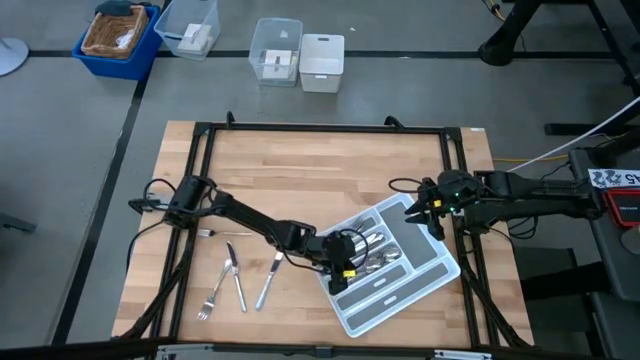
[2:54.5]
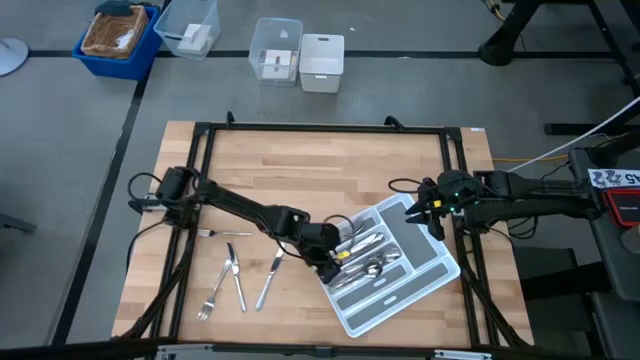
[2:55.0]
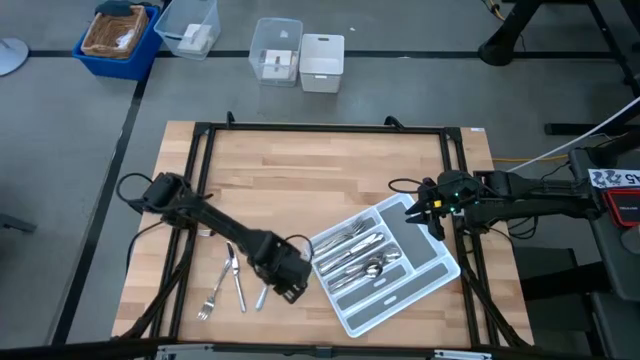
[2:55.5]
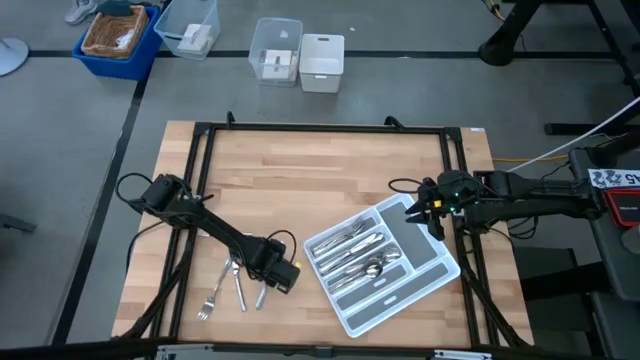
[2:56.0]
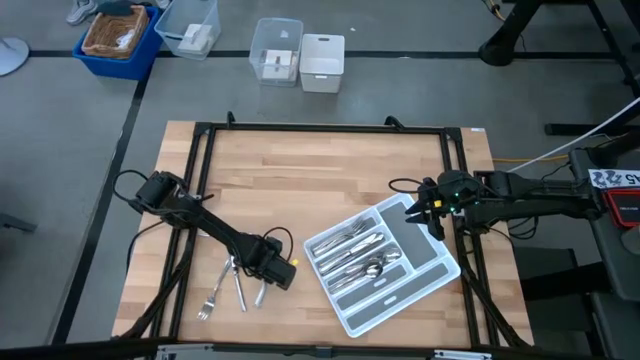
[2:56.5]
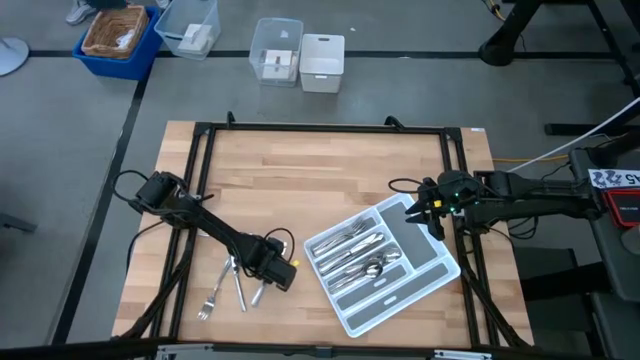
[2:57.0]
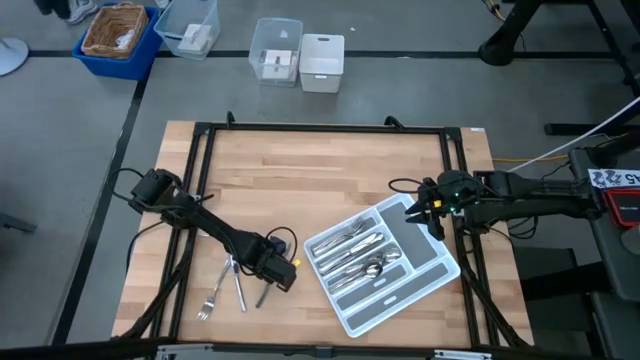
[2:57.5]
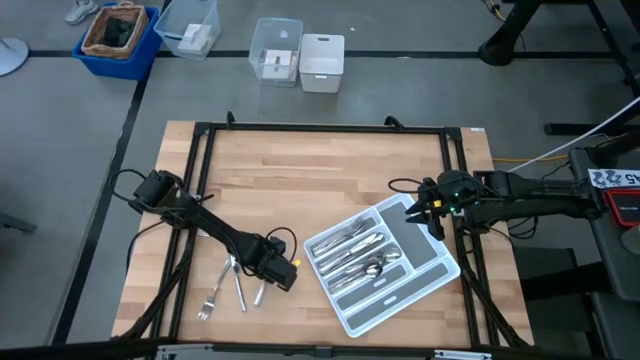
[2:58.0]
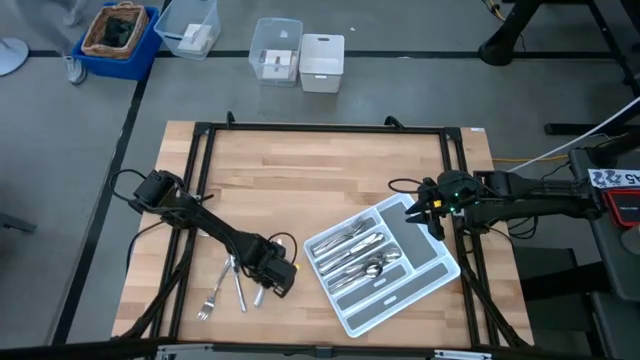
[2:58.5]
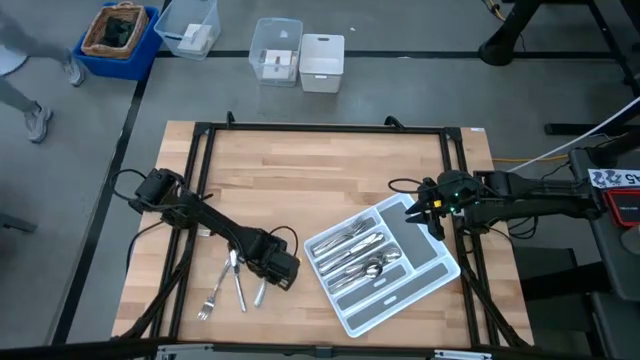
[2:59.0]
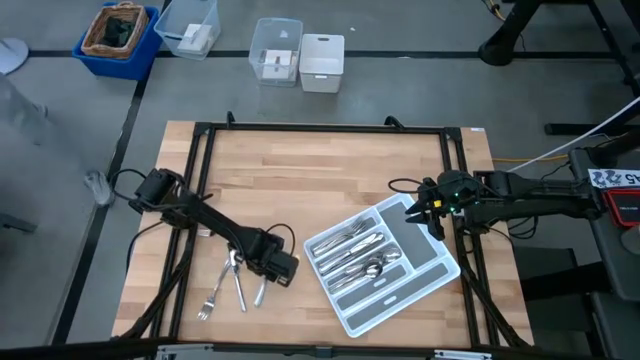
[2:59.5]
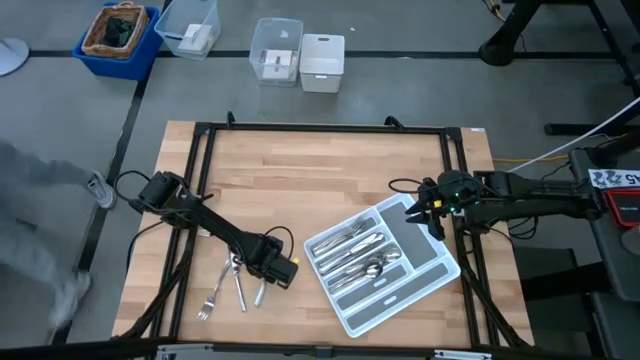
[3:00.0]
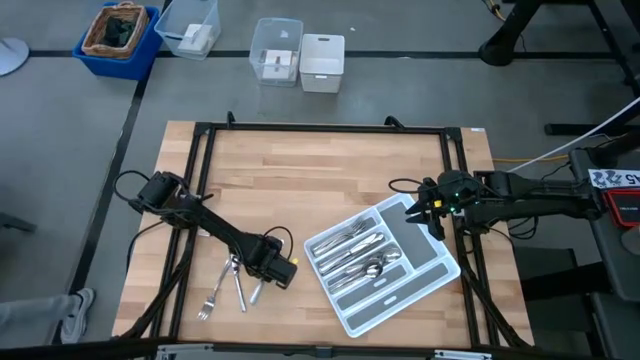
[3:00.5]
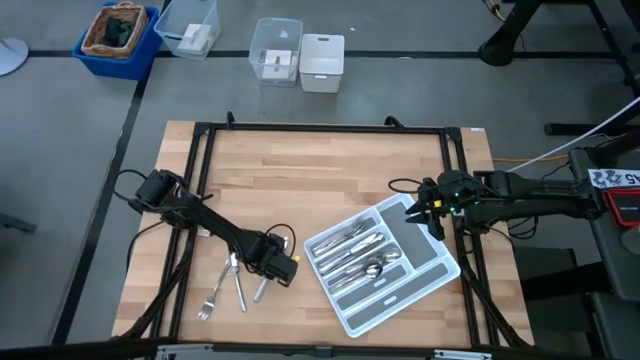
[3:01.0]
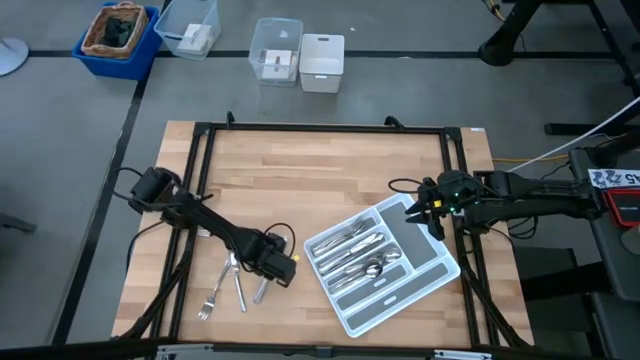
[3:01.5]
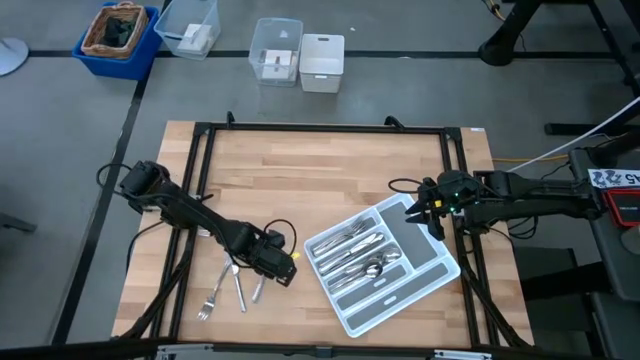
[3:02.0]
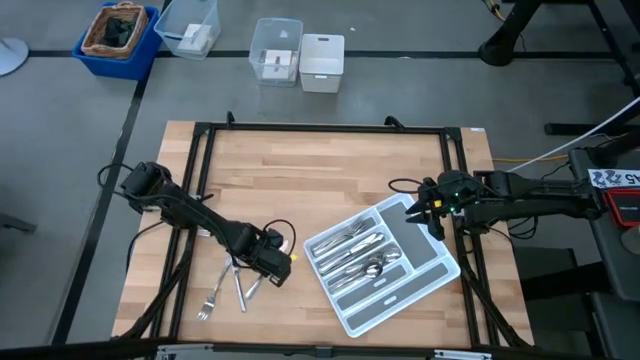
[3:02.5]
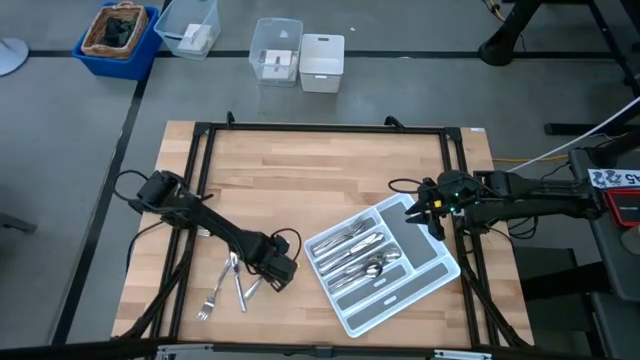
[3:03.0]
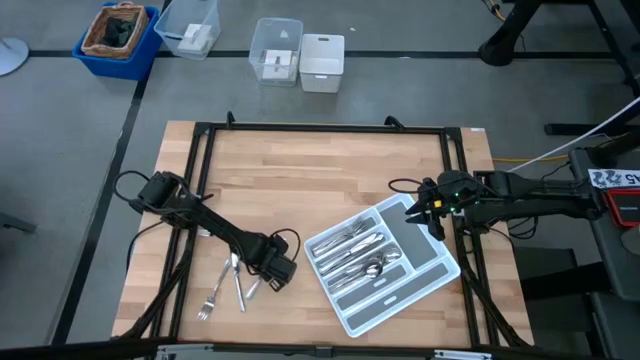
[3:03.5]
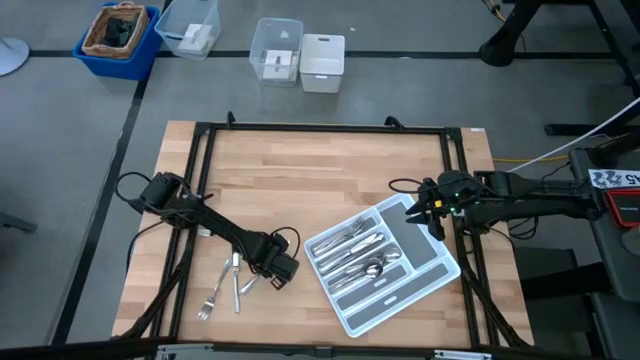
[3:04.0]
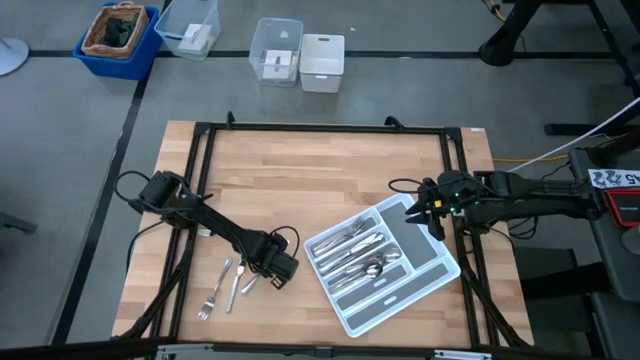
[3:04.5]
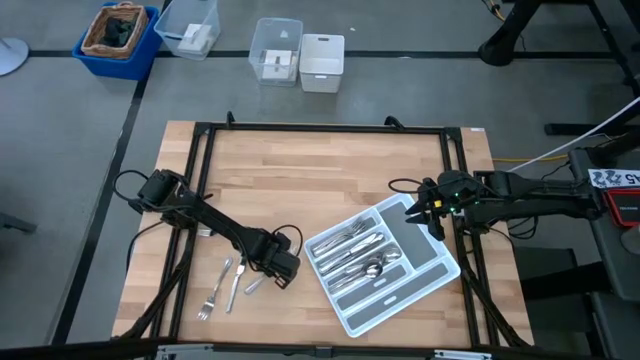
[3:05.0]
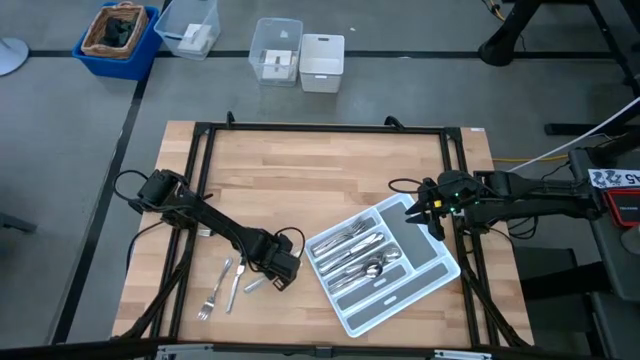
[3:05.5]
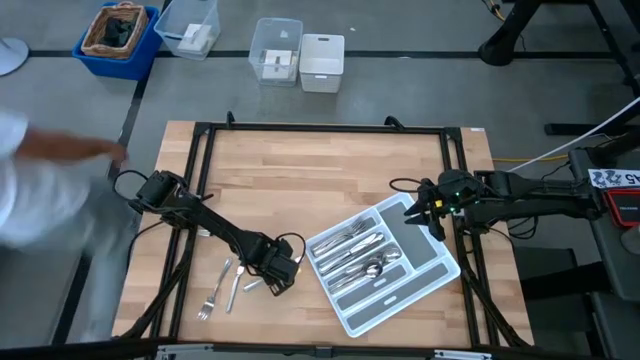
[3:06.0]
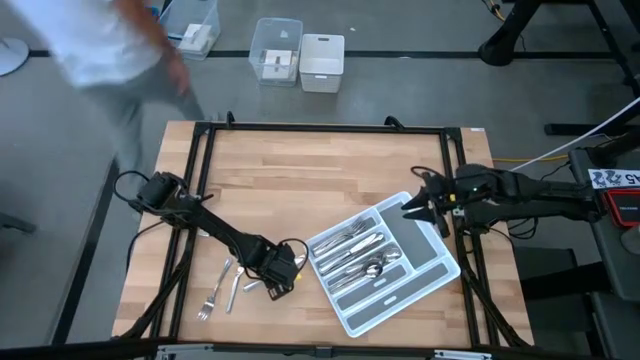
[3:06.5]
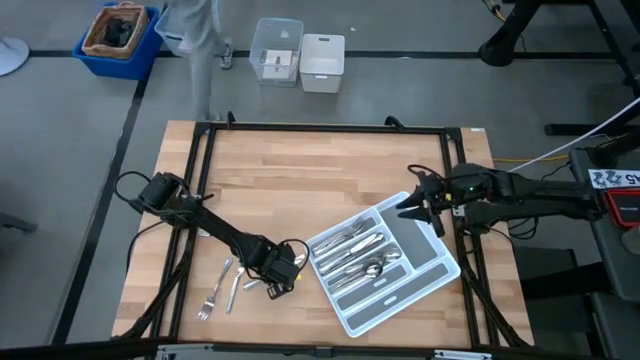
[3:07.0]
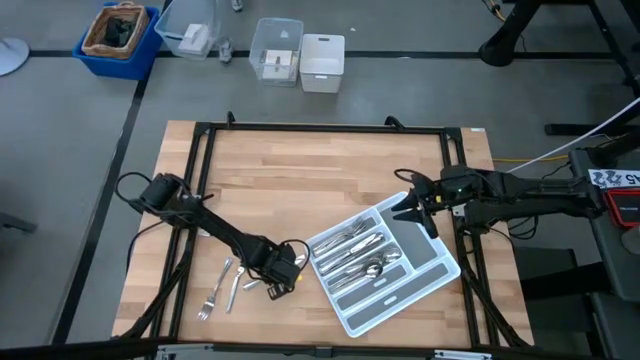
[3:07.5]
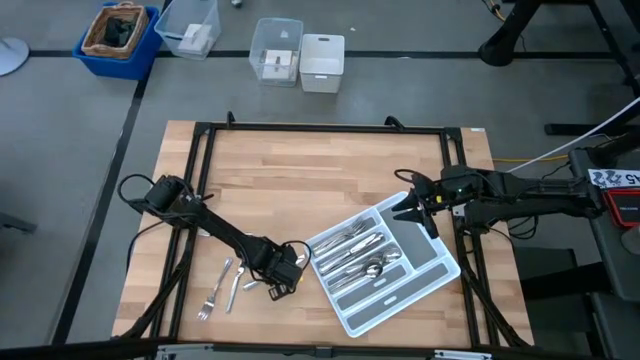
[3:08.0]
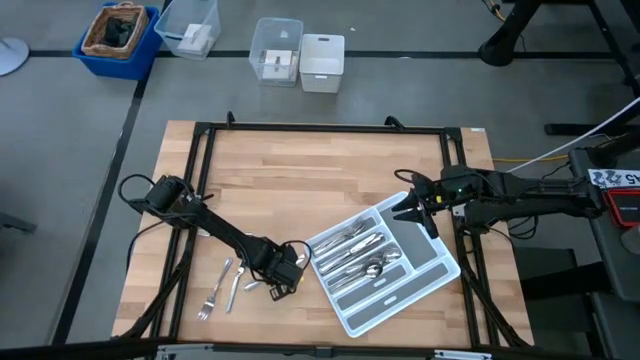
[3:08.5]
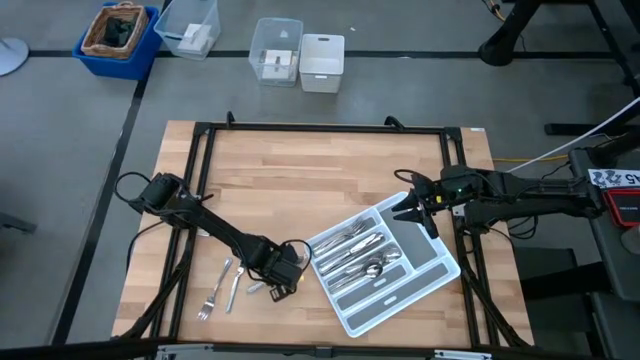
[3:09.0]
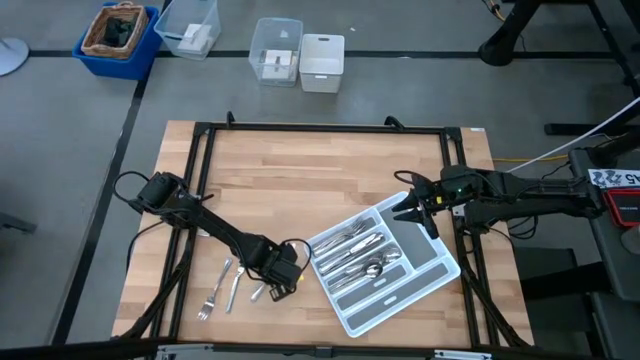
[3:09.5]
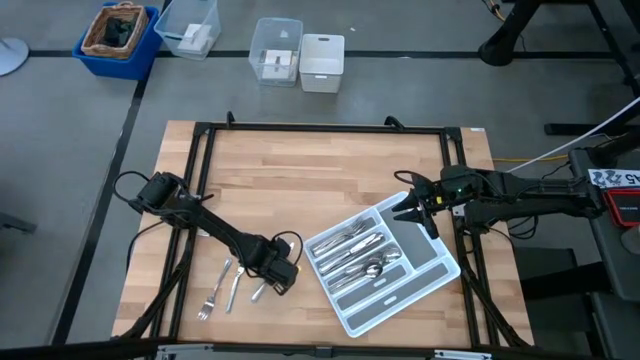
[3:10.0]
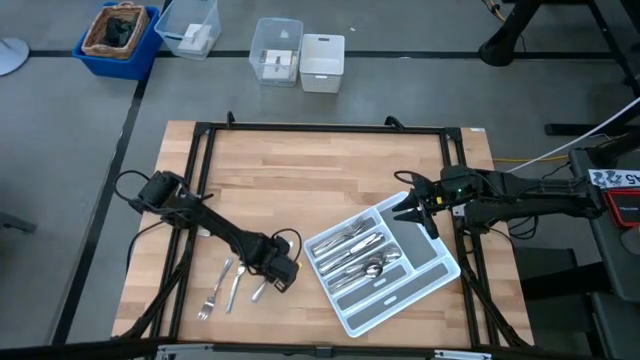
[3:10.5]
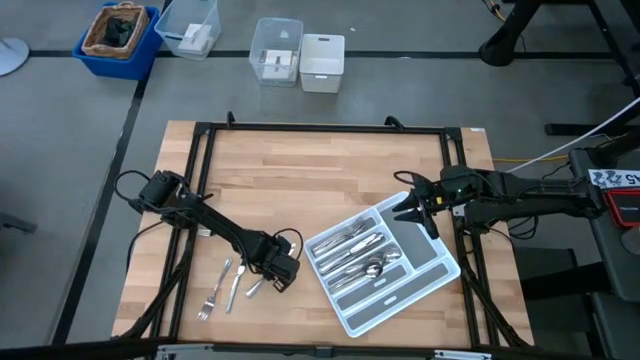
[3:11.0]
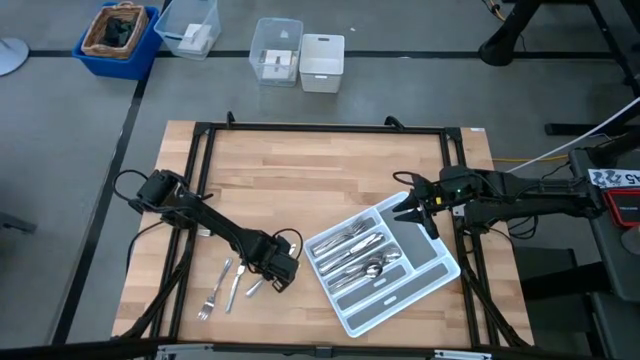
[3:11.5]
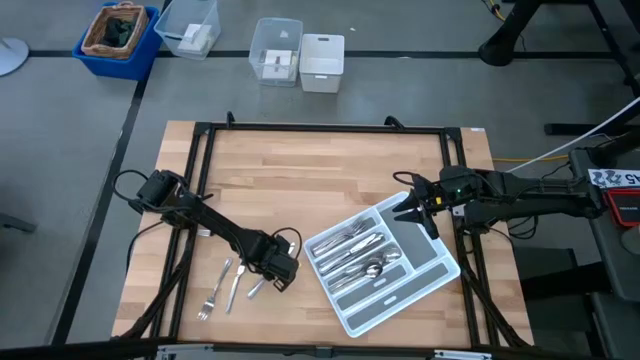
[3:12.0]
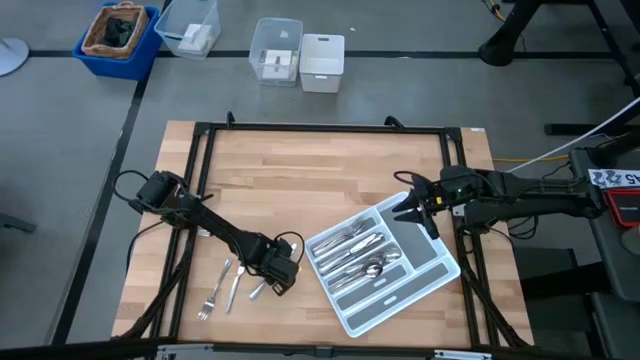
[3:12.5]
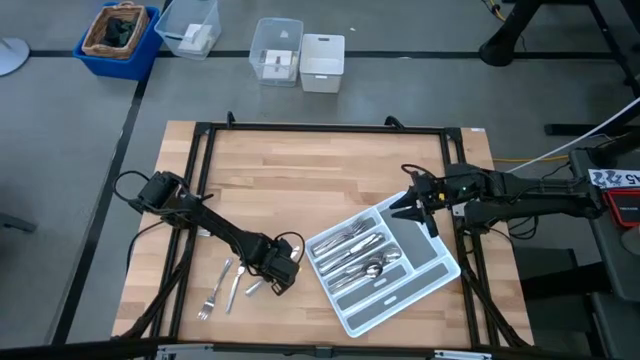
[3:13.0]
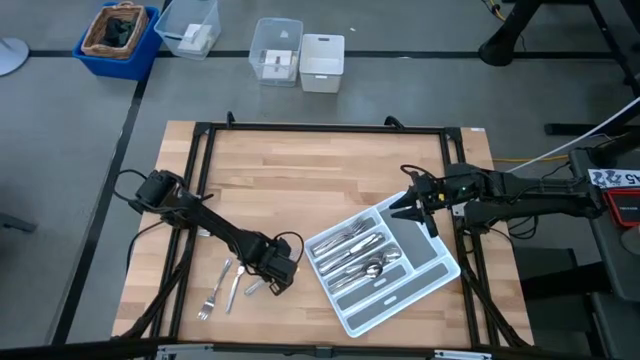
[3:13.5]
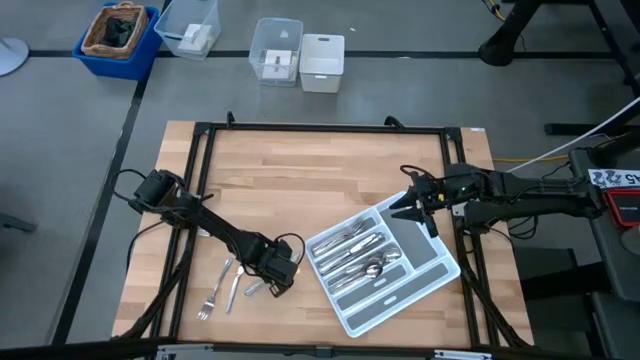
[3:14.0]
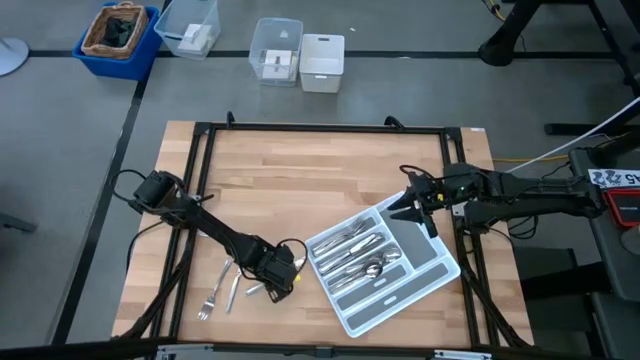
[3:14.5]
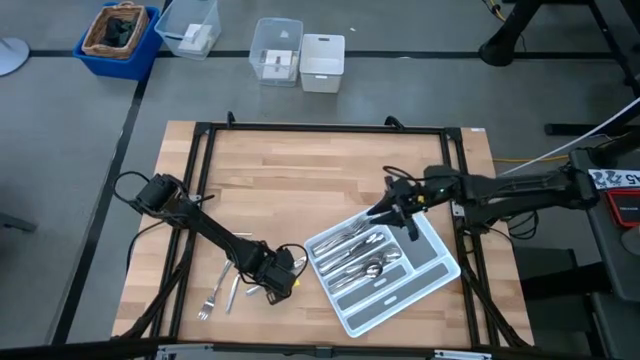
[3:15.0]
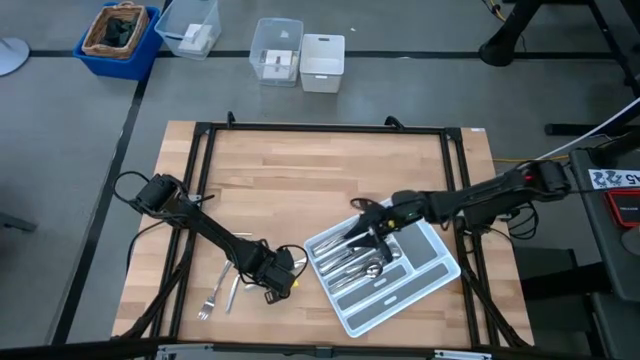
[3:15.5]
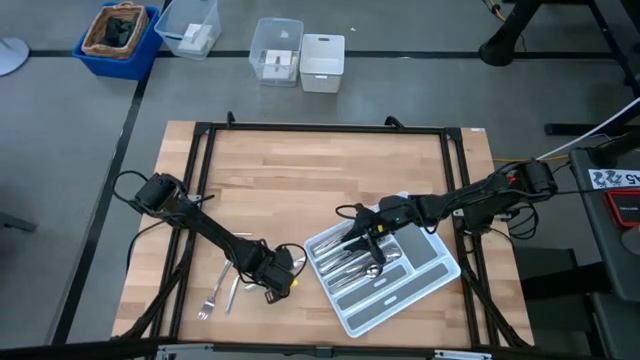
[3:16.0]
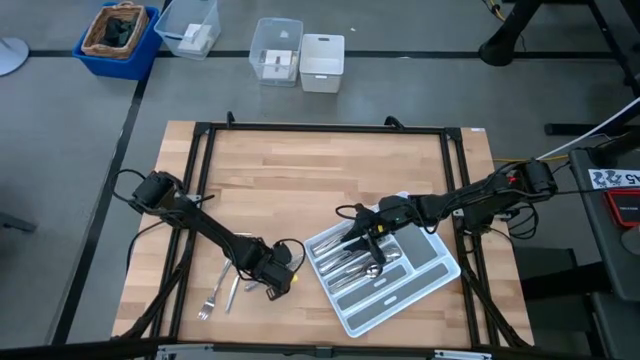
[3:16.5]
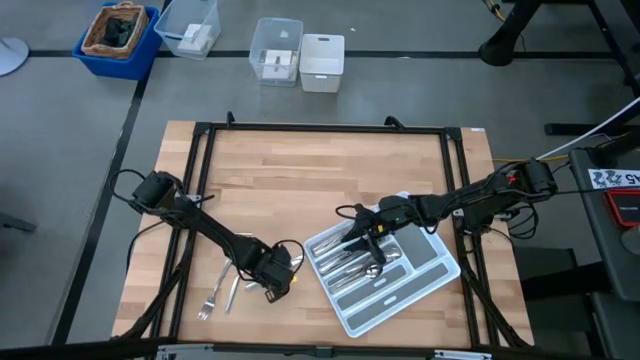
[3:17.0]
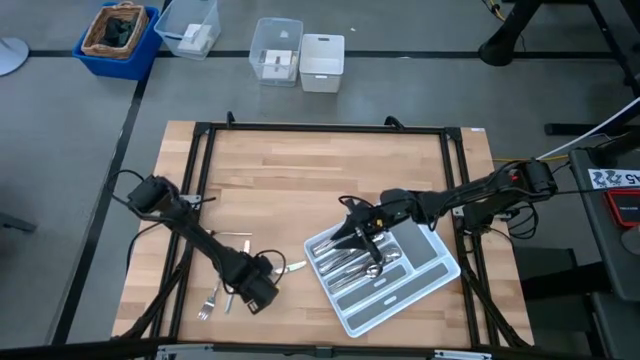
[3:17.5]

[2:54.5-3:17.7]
Task: Sort silverware
Put the silver table knife into the silverware tray
